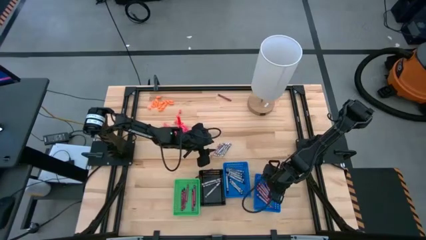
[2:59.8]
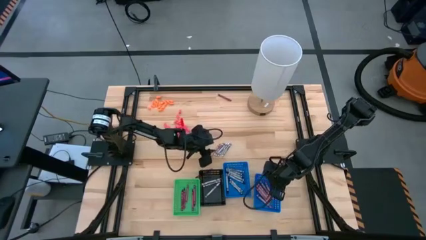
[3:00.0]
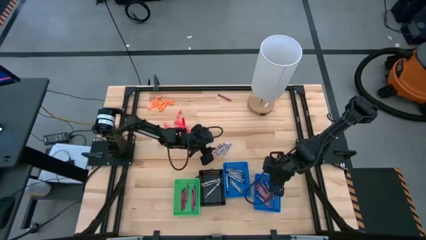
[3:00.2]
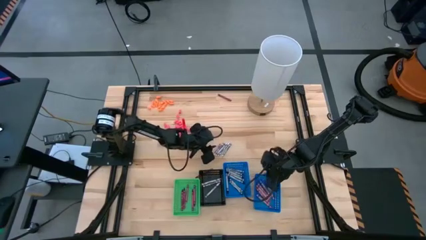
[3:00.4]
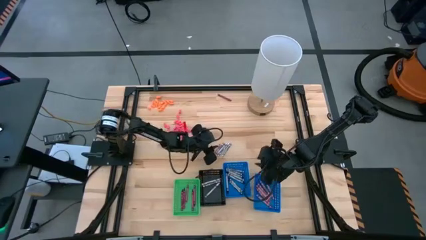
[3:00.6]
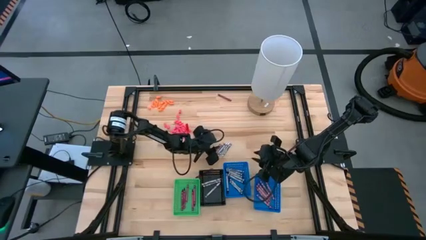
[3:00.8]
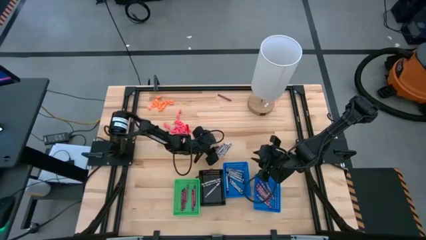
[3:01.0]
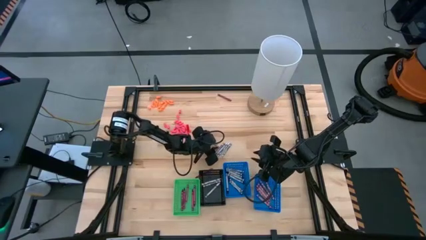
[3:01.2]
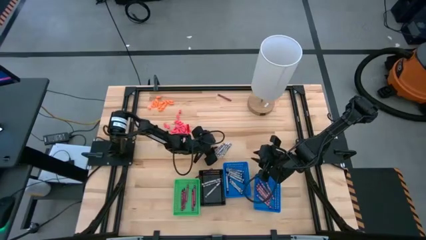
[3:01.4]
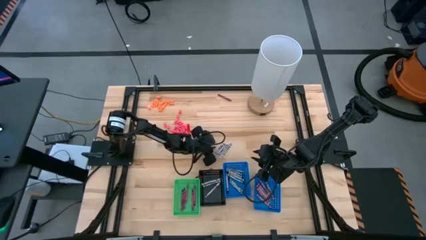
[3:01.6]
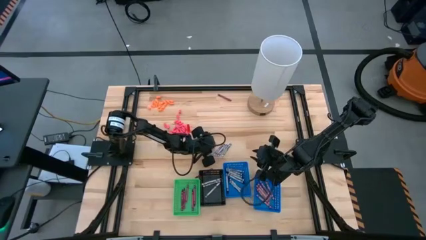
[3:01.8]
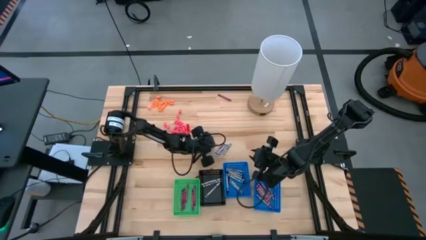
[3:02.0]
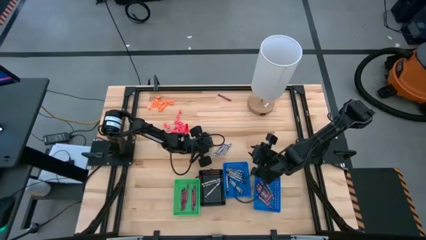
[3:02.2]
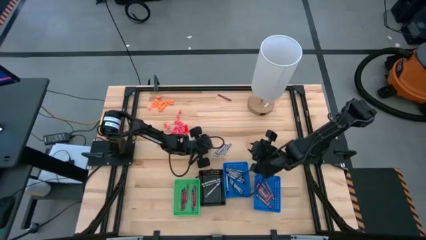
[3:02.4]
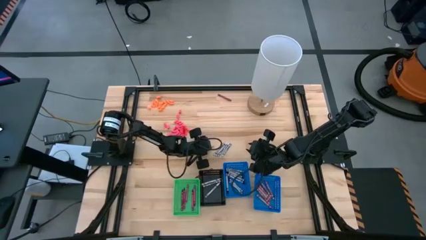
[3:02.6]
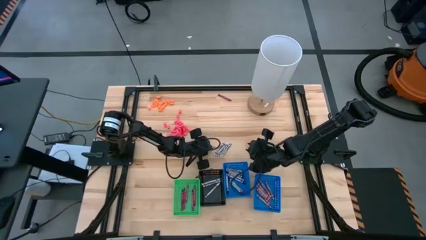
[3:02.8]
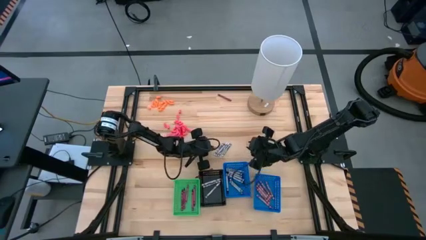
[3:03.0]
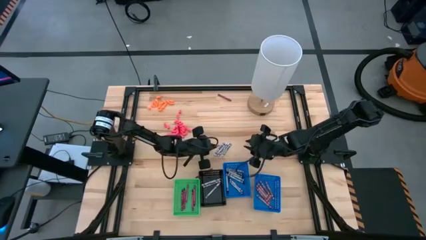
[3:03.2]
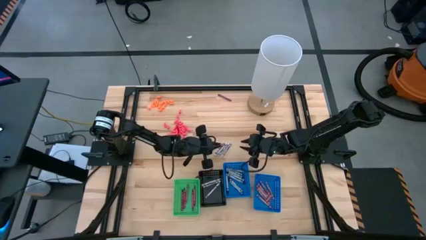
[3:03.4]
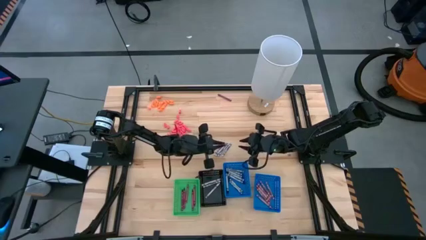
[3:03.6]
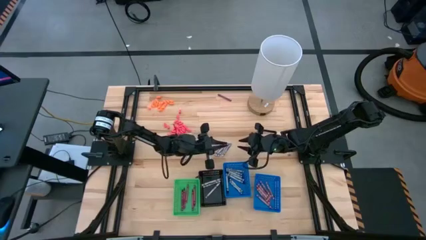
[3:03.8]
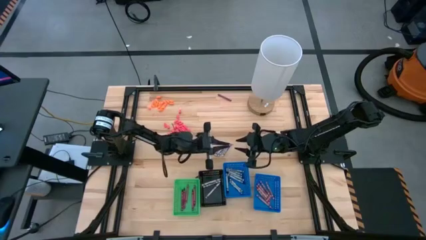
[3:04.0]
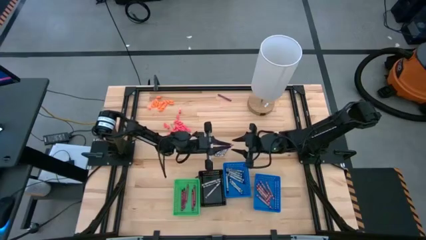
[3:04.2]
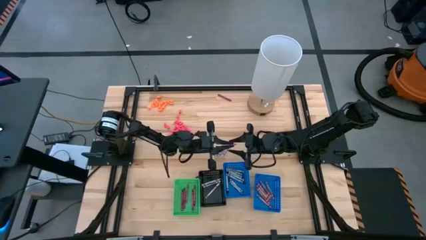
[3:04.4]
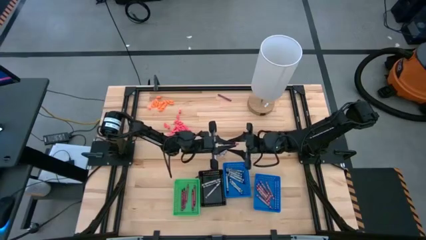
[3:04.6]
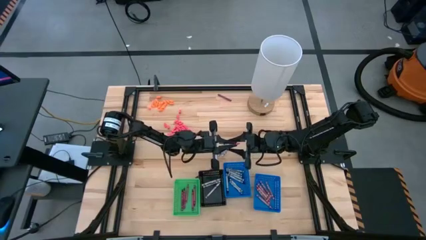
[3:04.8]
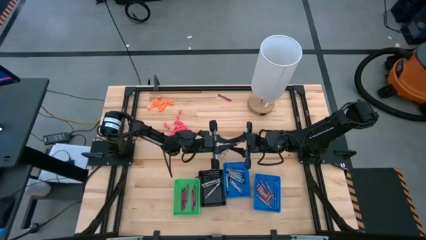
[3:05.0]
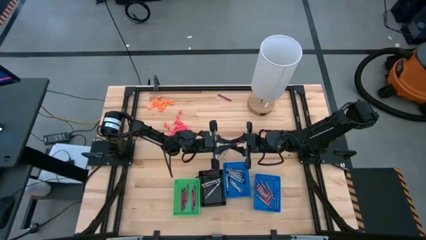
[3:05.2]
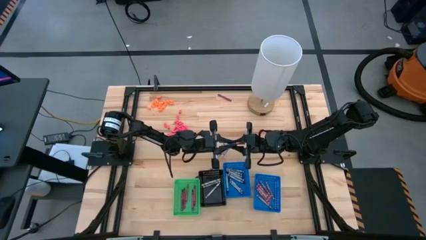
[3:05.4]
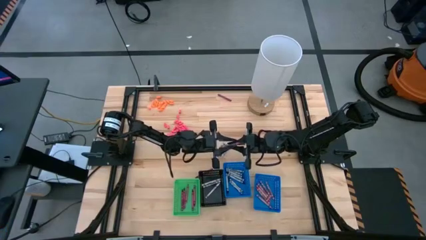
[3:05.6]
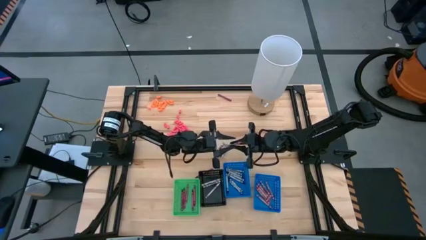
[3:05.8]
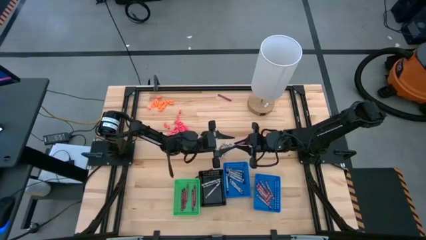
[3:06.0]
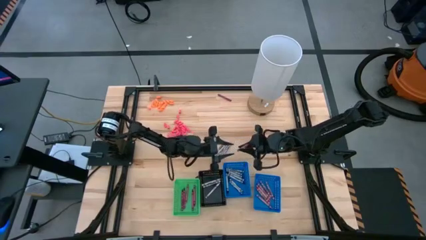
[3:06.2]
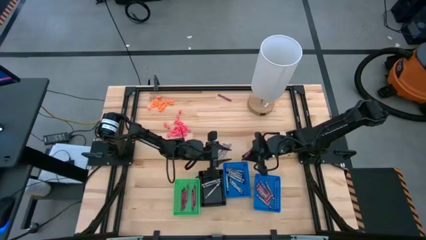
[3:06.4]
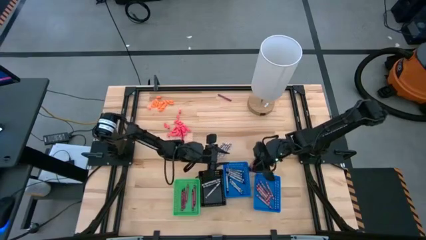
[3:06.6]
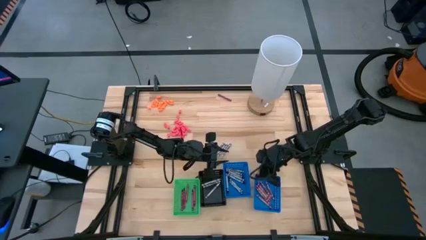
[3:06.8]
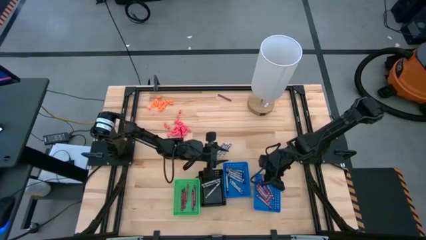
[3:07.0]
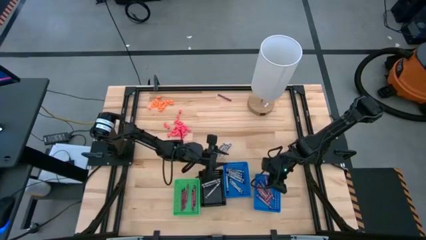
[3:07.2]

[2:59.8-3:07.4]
Task: Sort crayons
Put the pink crayon into the right blue bin

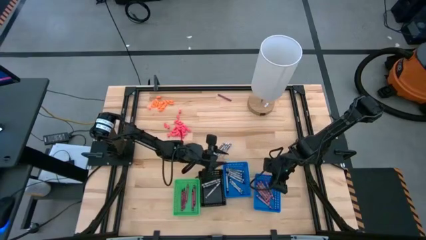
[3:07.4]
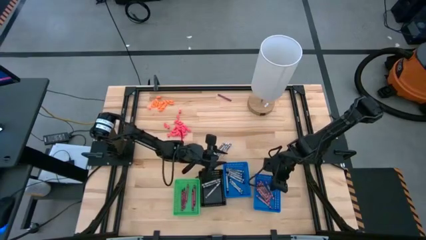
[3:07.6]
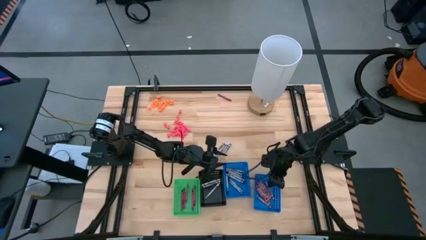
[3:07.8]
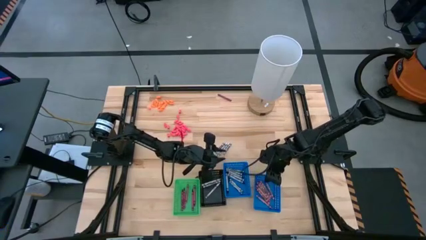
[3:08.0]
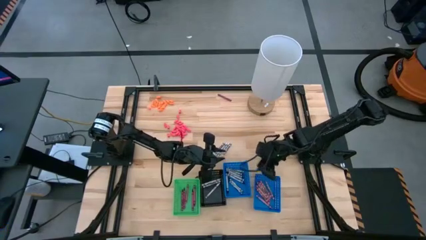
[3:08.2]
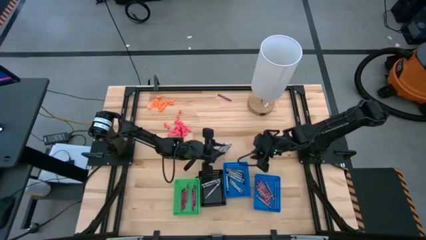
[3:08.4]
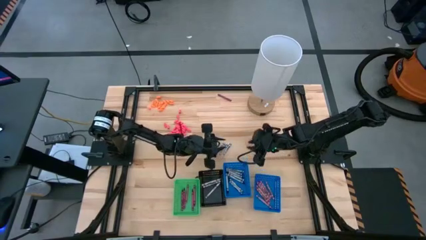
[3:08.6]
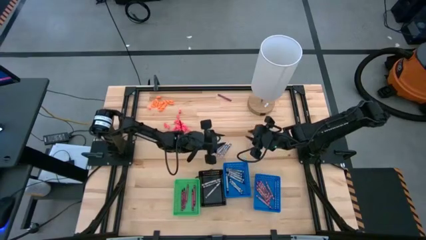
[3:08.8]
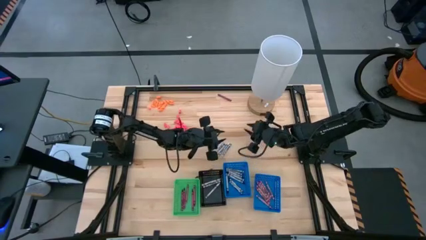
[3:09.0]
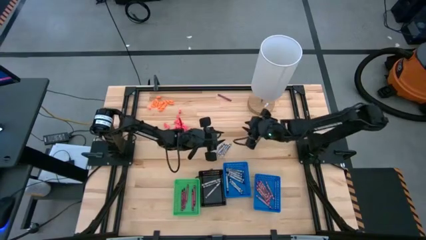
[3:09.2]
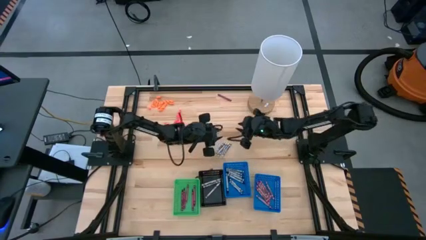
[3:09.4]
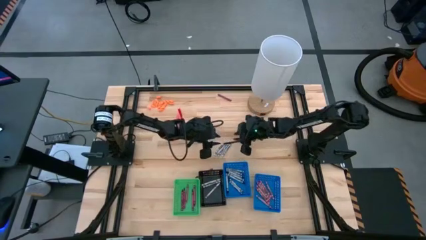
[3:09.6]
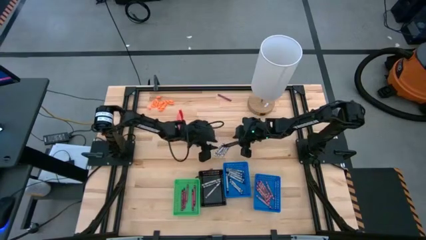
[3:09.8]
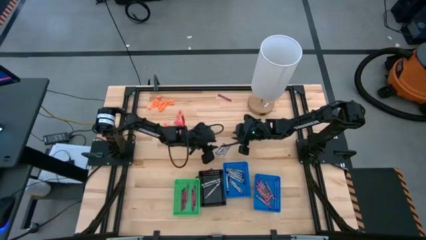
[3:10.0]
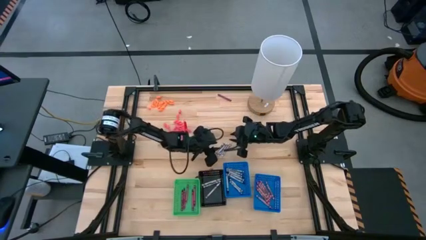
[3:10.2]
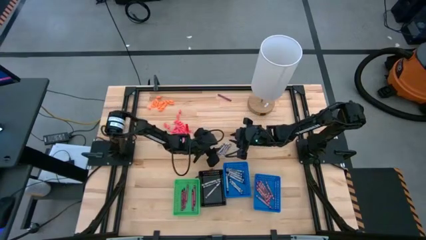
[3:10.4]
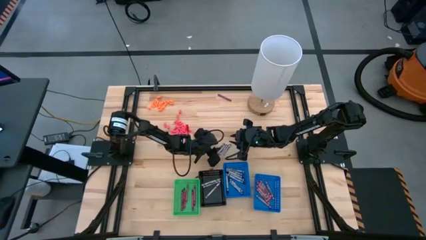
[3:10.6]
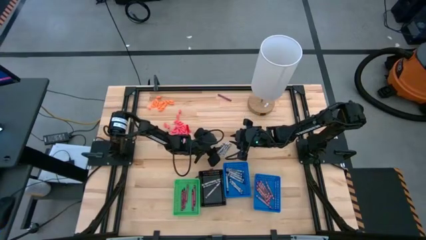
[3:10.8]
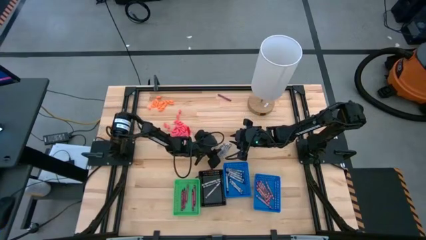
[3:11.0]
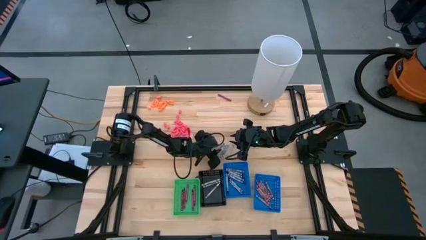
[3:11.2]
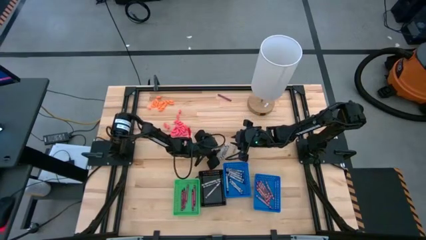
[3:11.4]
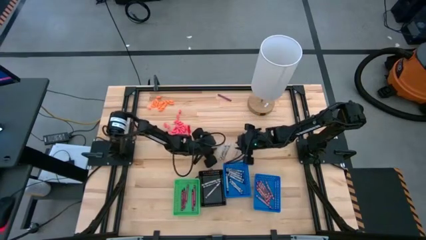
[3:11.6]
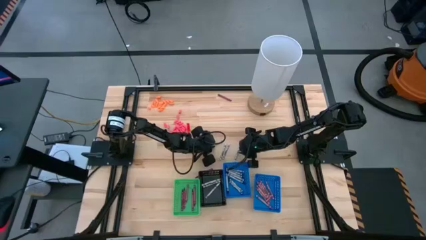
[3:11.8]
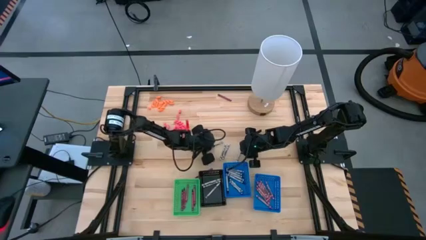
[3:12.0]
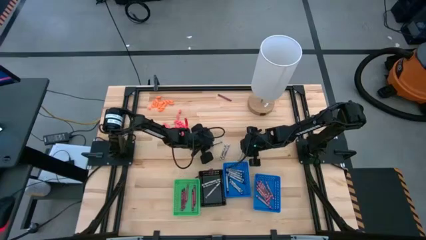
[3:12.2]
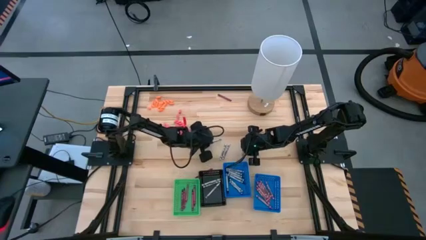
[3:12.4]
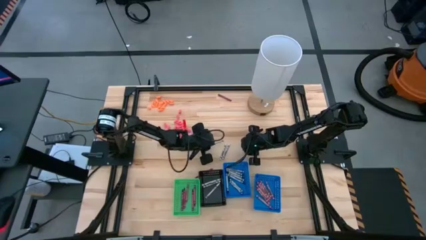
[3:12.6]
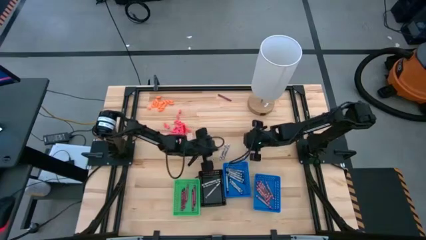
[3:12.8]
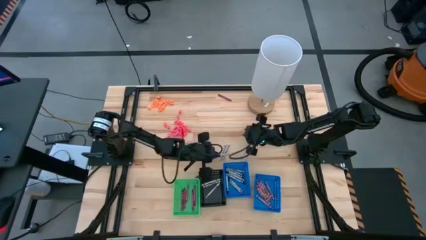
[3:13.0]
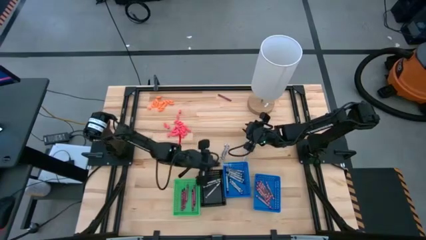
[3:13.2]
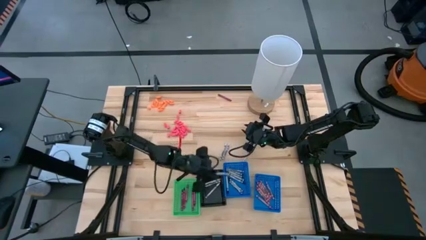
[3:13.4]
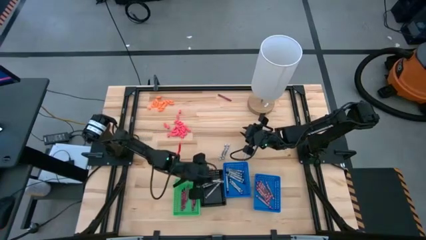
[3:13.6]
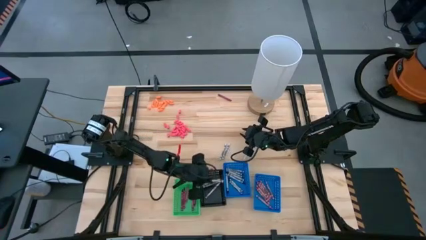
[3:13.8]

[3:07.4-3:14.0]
Put the white crayon into the black bin
